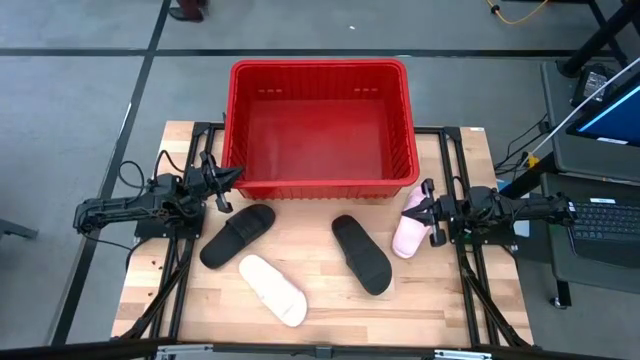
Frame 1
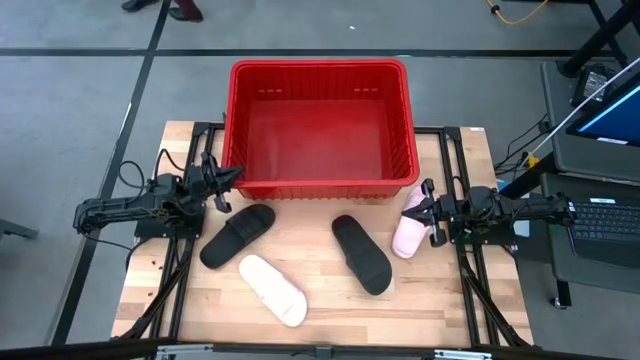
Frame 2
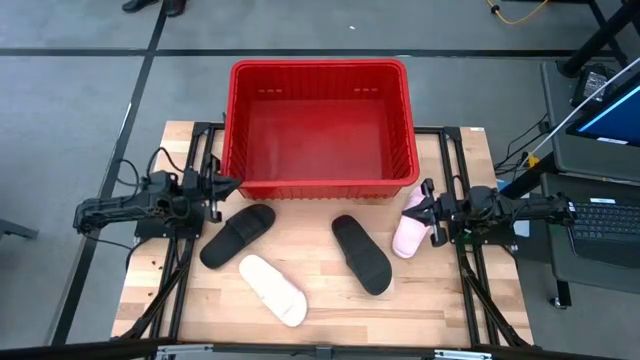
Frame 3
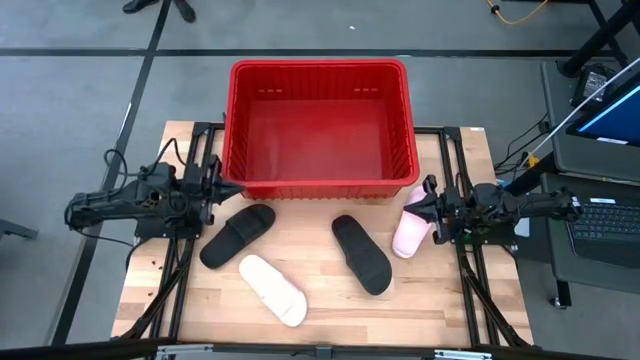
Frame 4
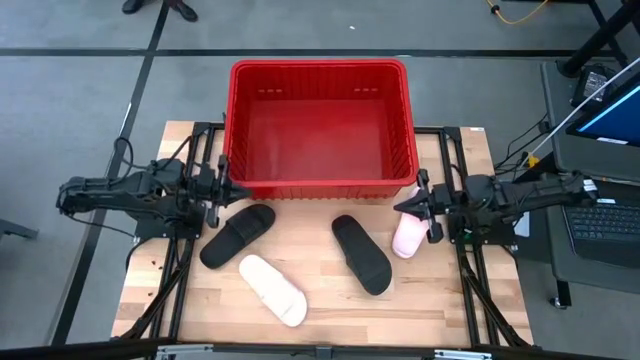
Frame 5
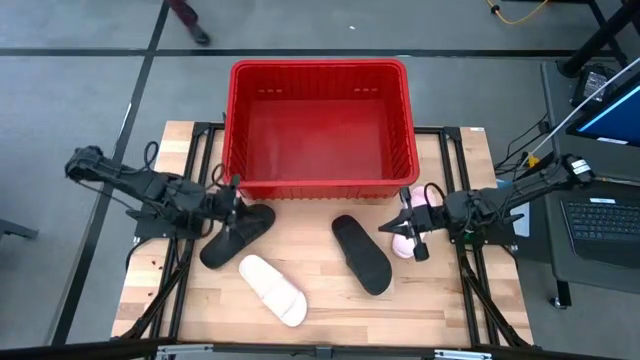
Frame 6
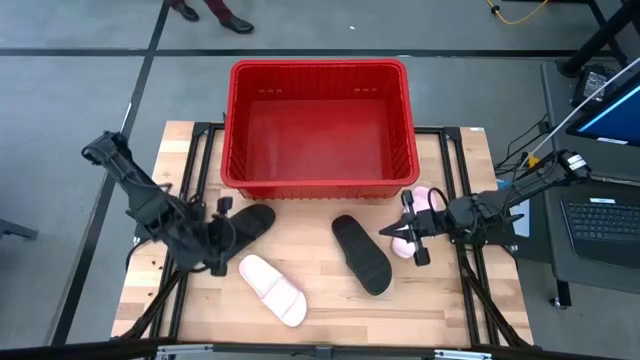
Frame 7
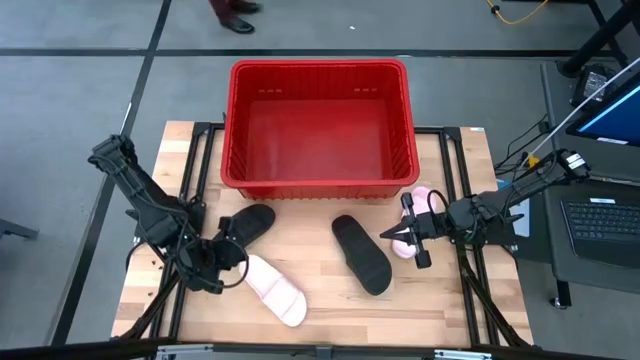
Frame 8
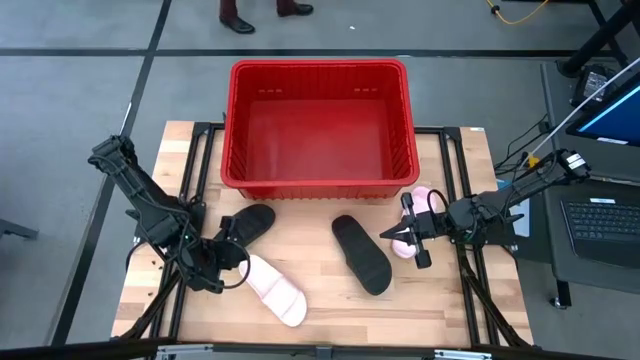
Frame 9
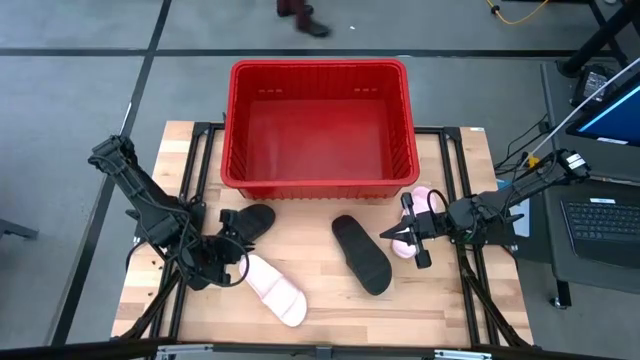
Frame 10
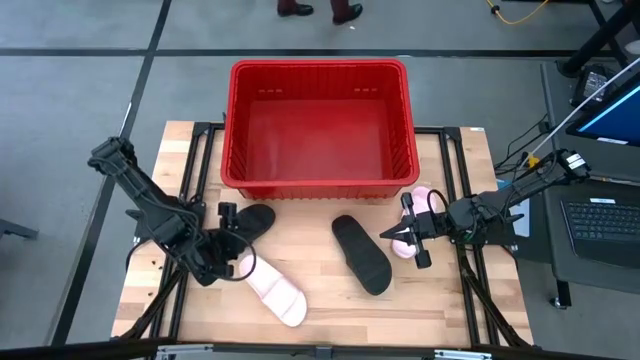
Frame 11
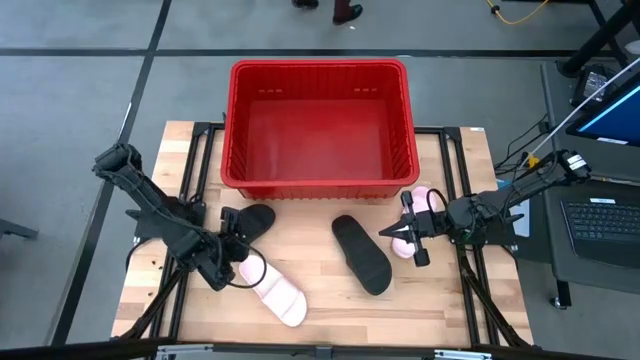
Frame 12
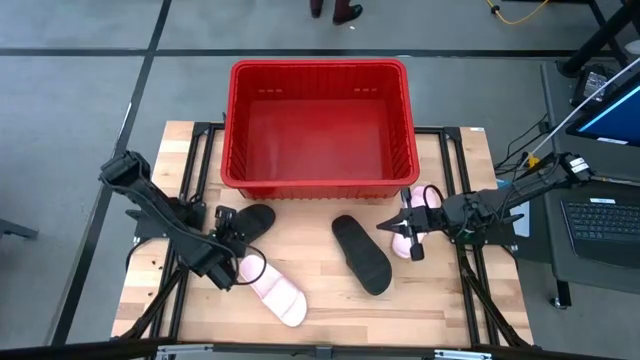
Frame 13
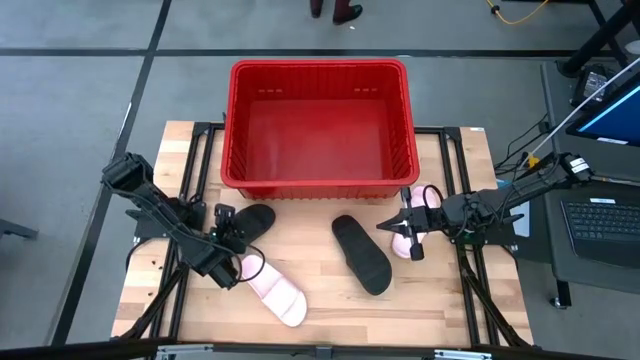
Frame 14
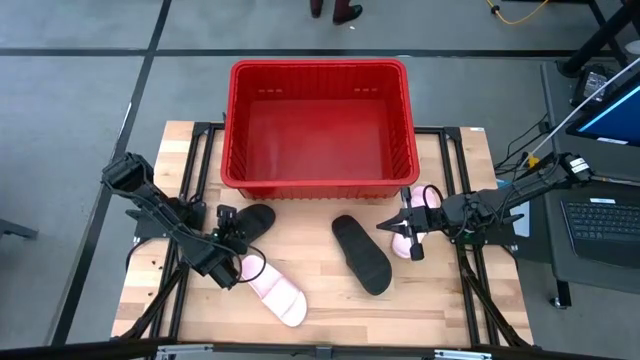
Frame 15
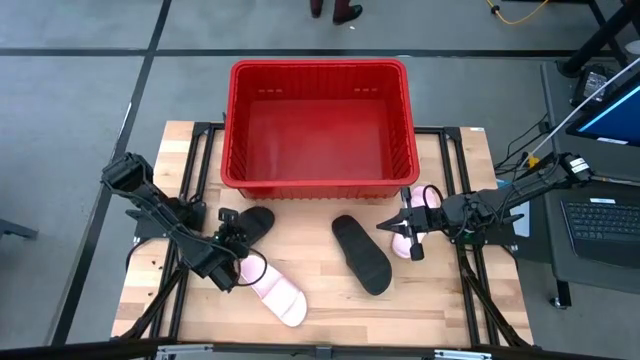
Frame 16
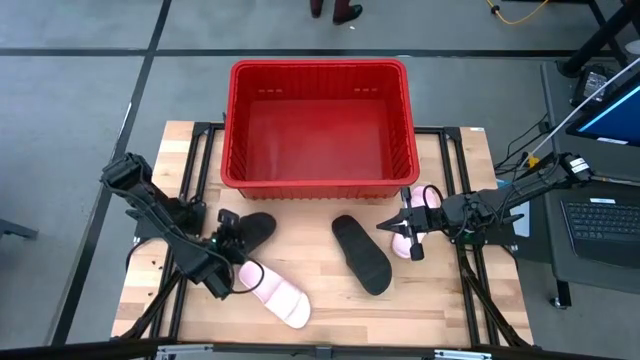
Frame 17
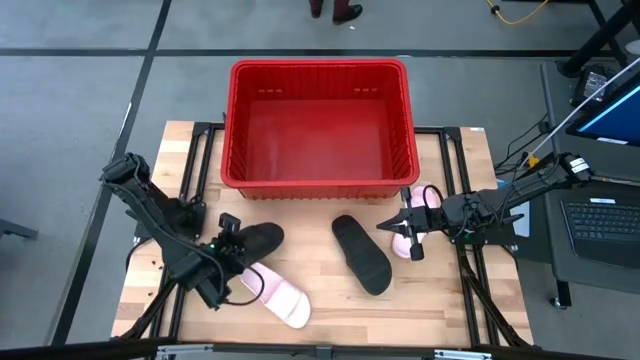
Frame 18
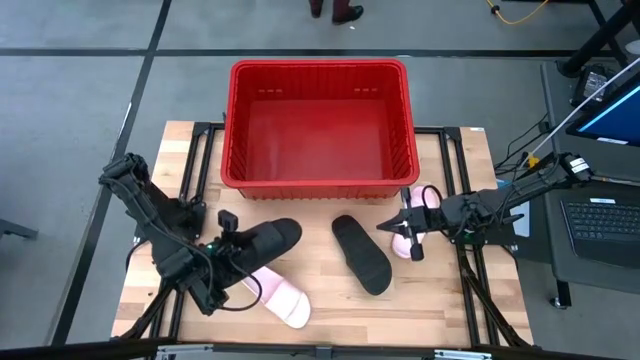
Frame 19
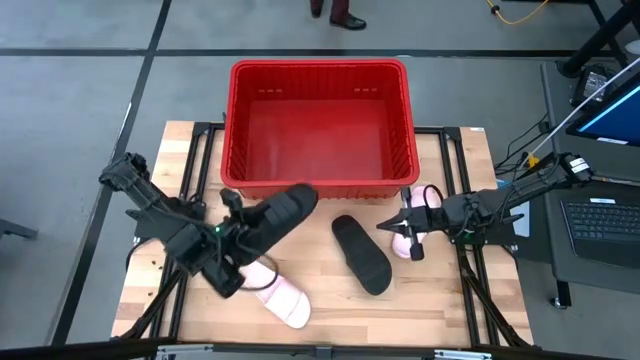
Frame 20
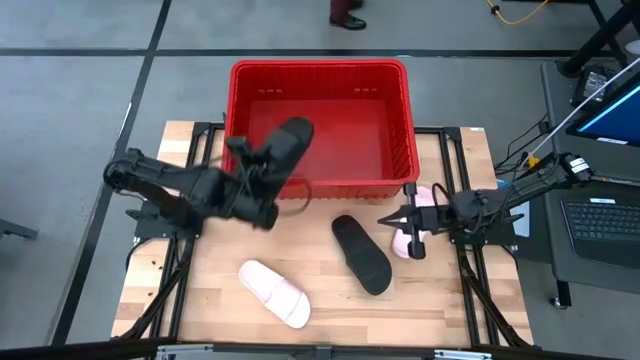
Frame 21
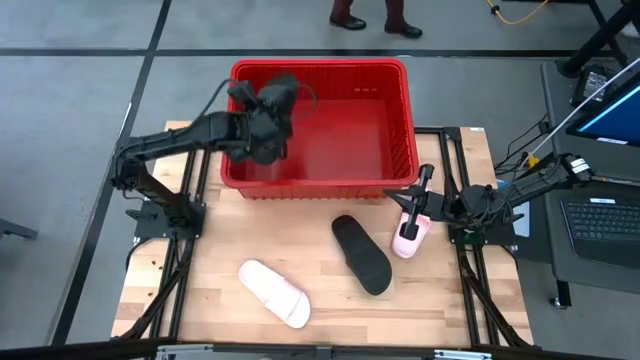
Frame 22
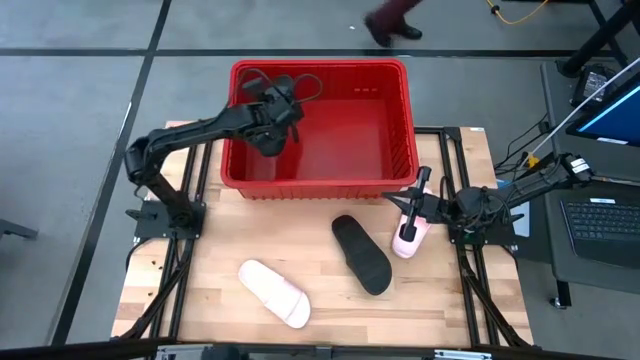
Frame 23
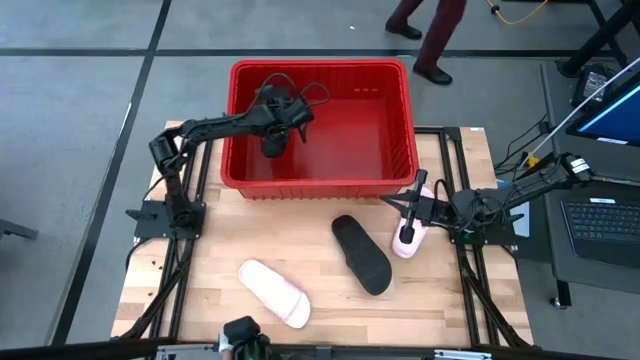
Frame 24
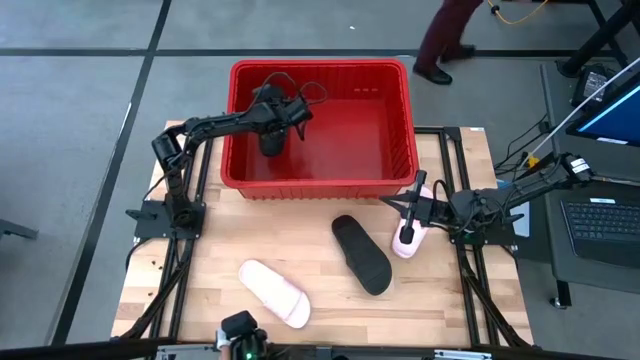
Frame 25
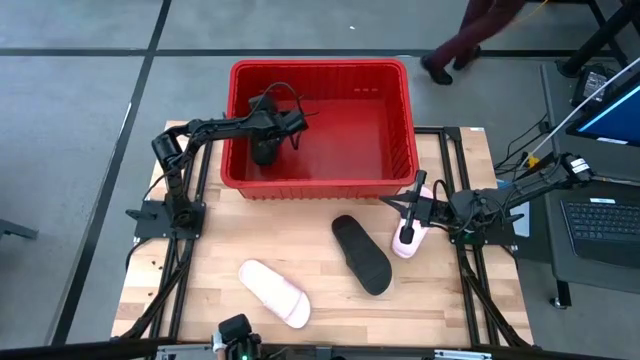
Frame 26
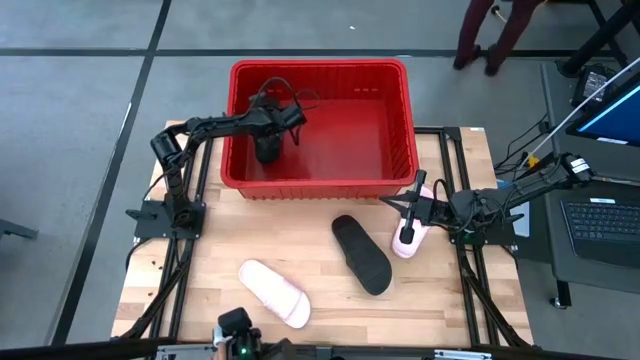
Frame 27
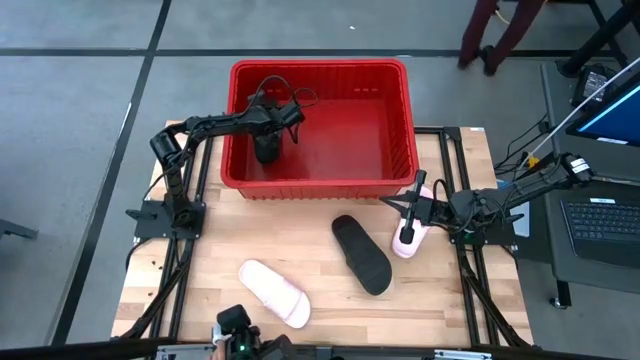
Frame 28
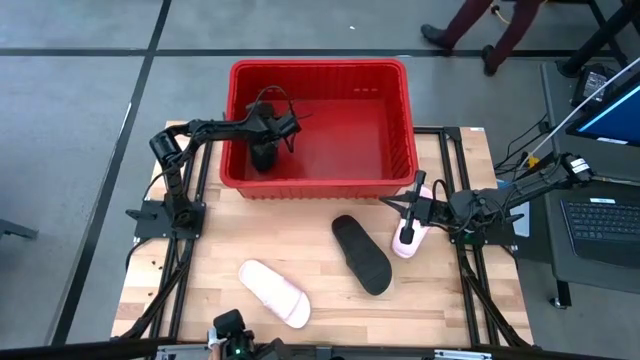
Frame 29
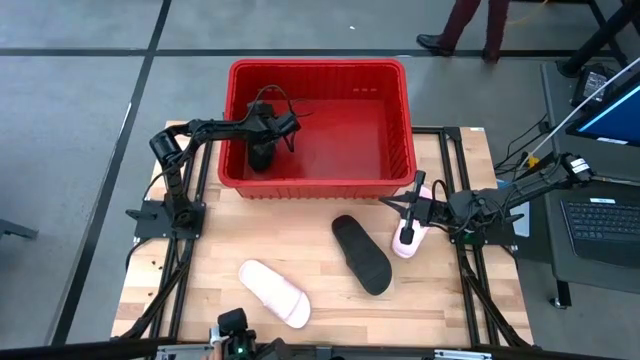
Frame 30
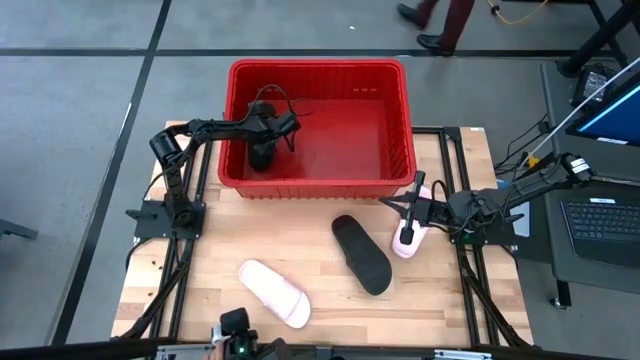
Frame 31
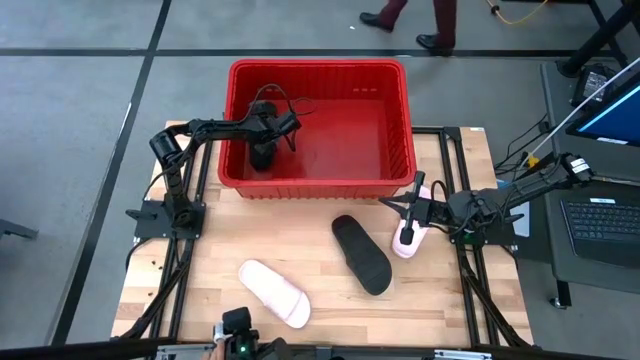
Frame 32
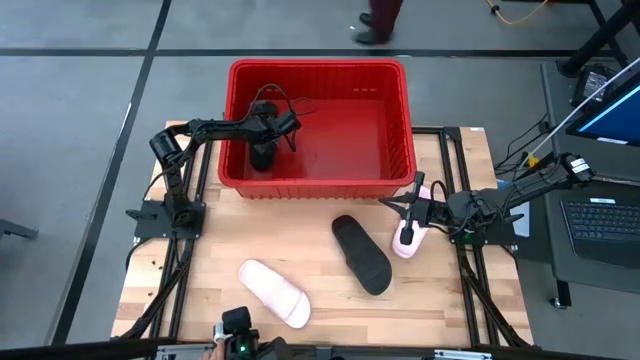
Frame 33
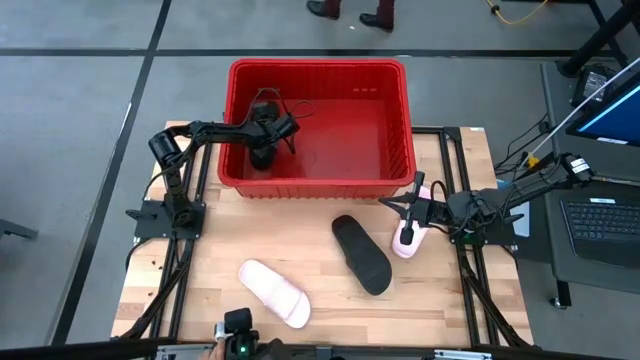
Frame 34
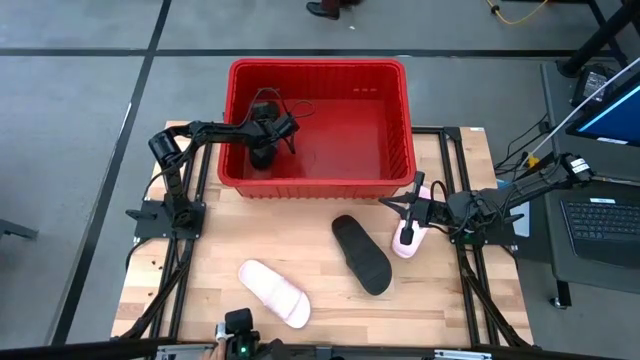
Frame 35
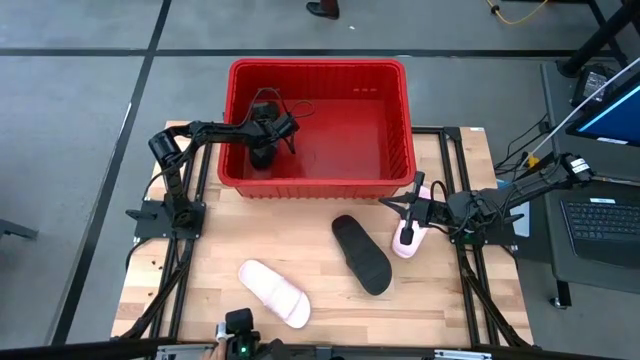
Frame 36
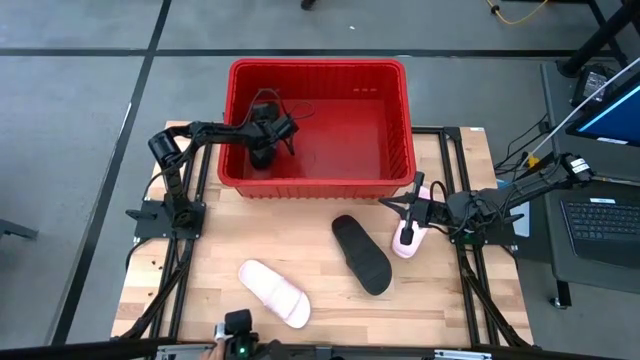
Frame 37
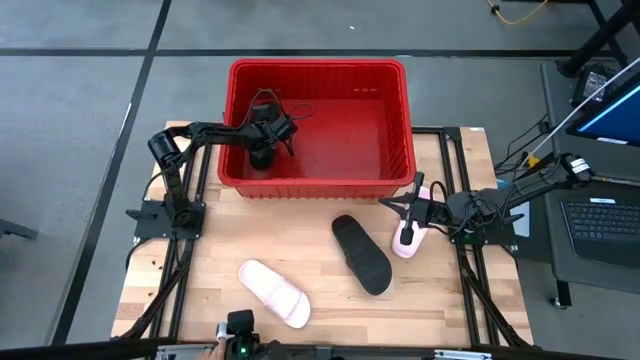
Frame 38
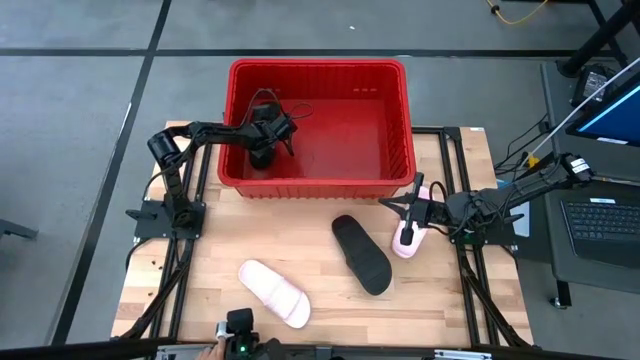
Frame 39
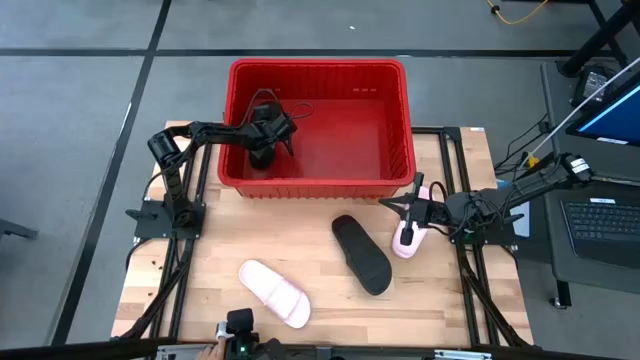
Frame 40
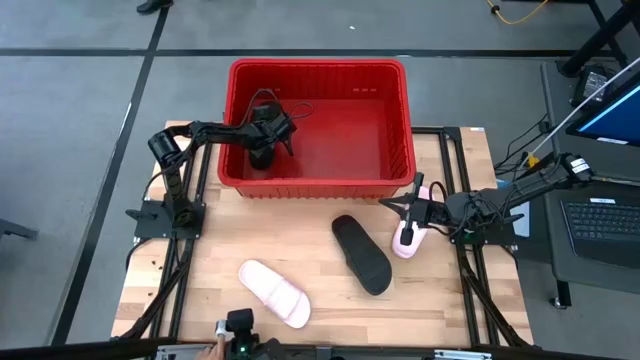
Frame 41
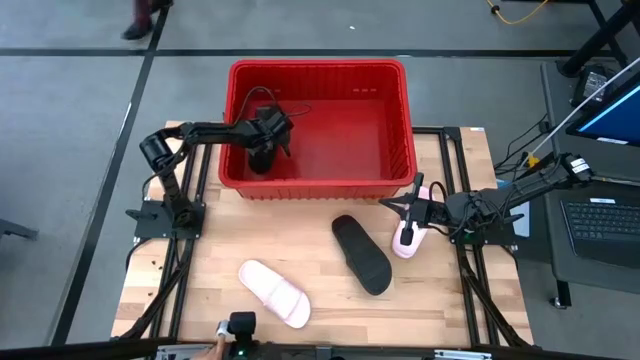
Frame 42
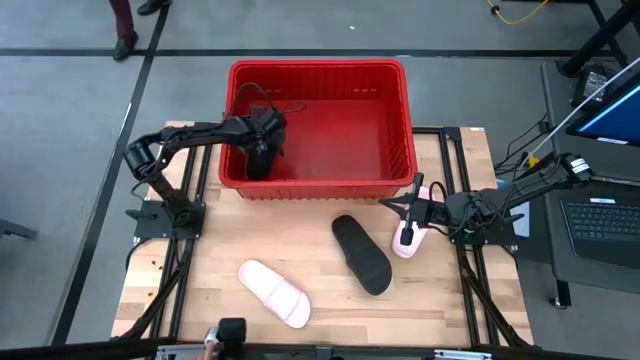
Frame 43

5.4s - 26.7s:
Task: Pick and place slides into bin
Put the left black slide into the red container
